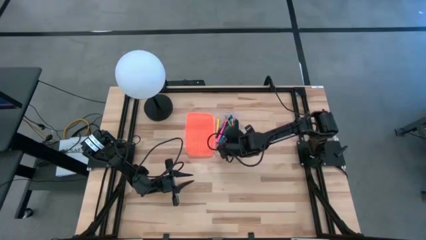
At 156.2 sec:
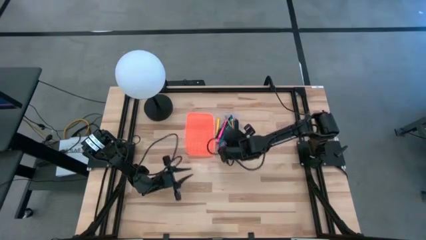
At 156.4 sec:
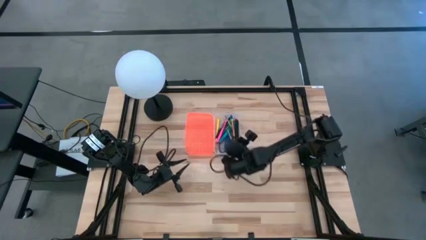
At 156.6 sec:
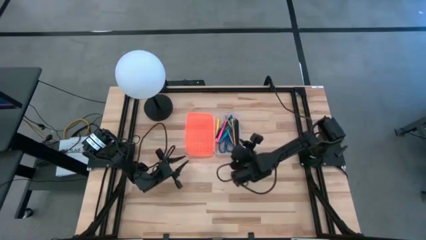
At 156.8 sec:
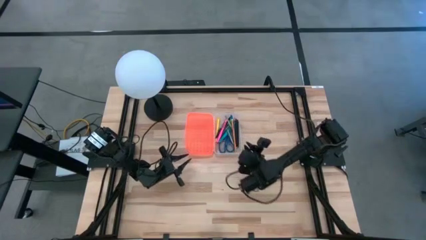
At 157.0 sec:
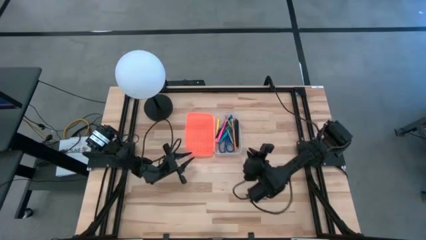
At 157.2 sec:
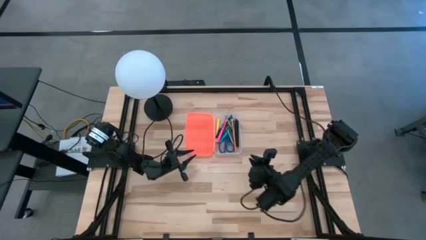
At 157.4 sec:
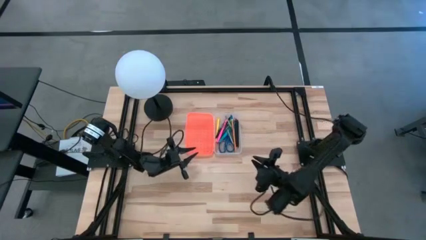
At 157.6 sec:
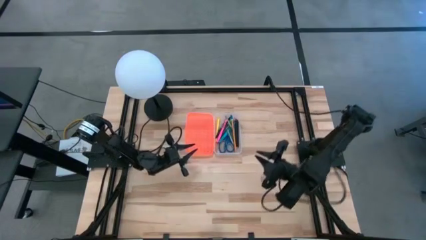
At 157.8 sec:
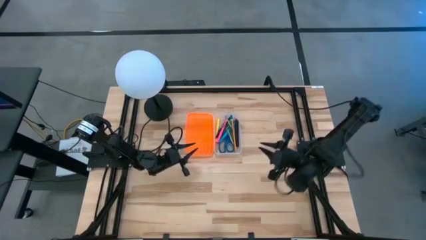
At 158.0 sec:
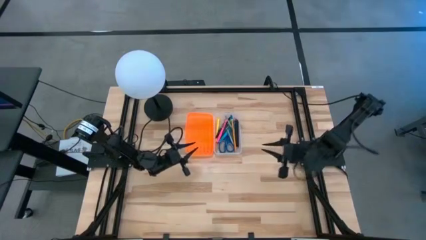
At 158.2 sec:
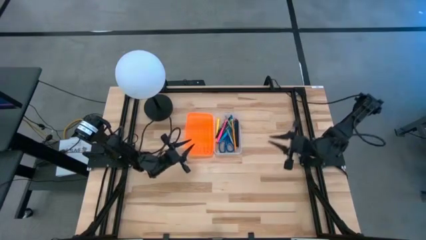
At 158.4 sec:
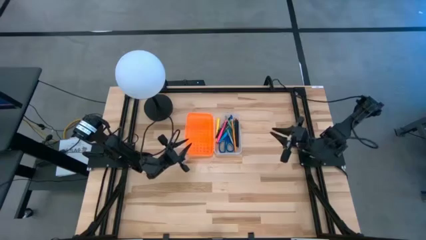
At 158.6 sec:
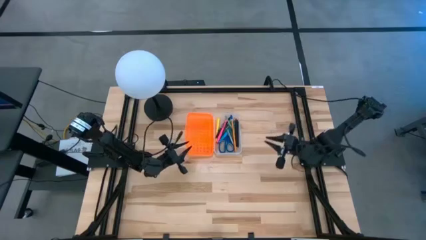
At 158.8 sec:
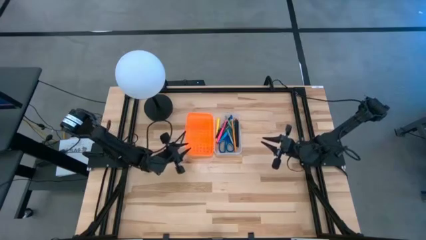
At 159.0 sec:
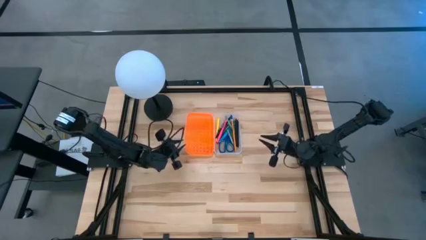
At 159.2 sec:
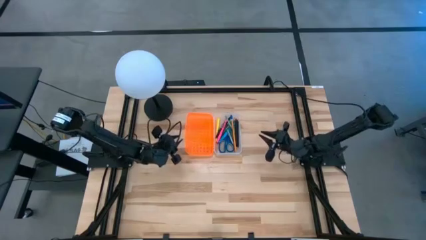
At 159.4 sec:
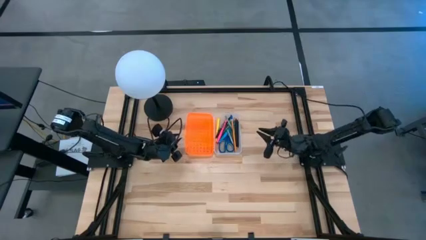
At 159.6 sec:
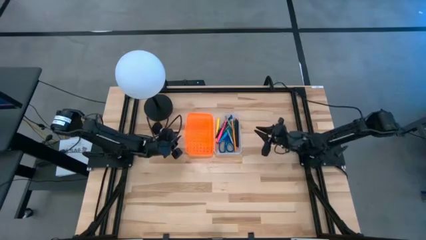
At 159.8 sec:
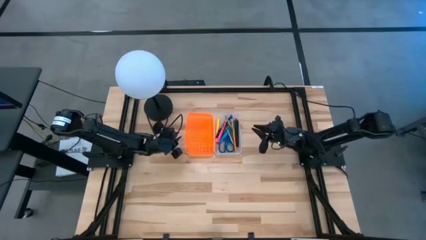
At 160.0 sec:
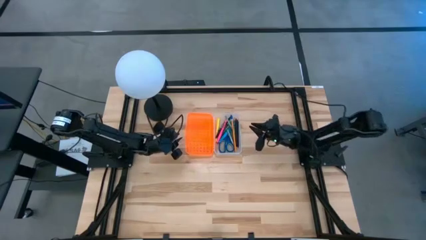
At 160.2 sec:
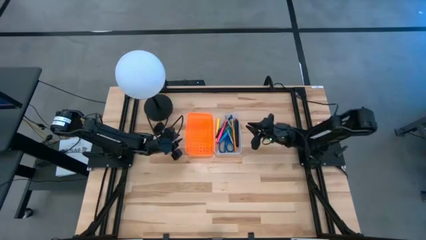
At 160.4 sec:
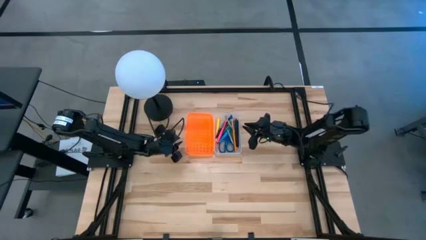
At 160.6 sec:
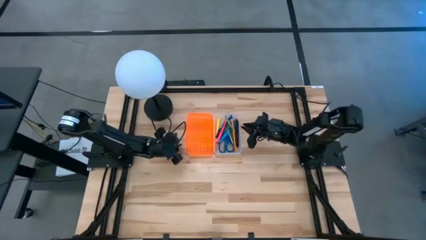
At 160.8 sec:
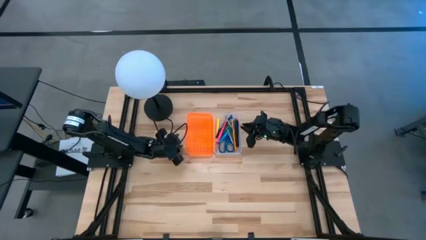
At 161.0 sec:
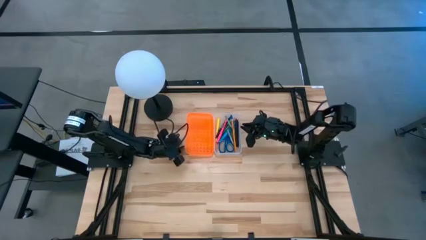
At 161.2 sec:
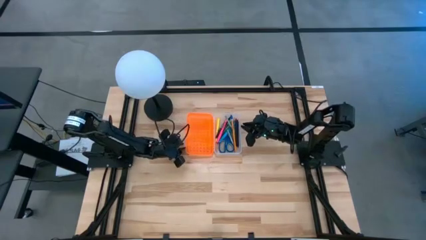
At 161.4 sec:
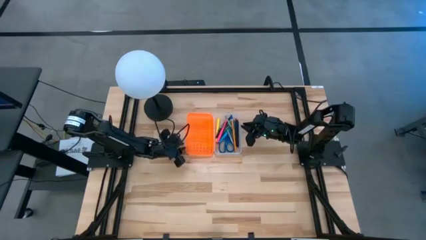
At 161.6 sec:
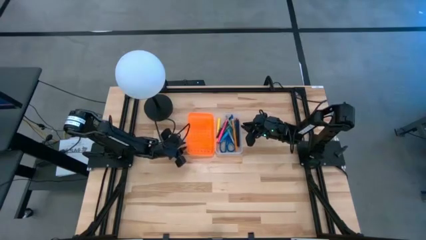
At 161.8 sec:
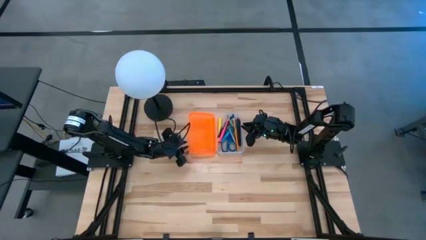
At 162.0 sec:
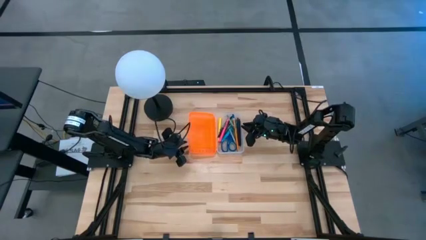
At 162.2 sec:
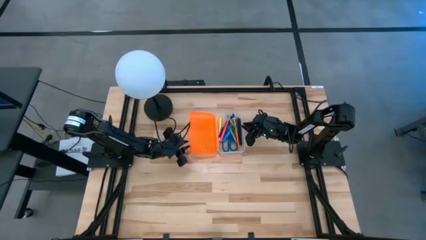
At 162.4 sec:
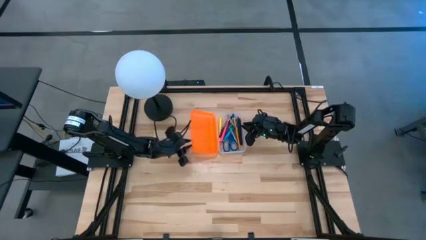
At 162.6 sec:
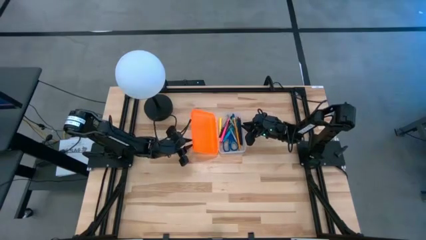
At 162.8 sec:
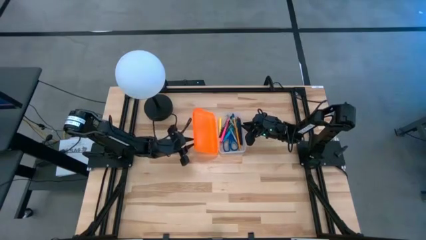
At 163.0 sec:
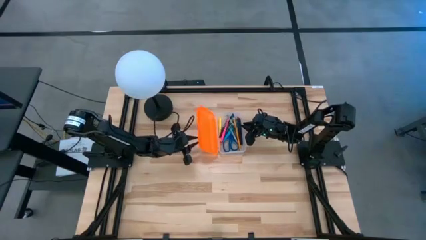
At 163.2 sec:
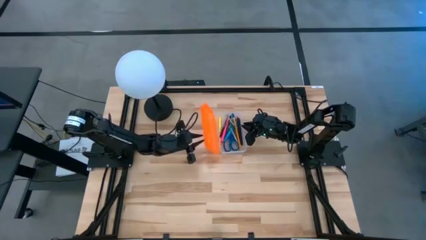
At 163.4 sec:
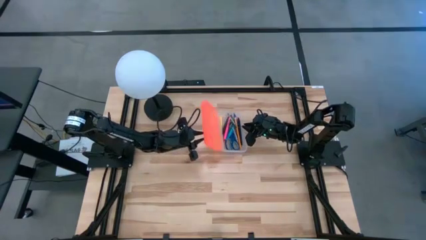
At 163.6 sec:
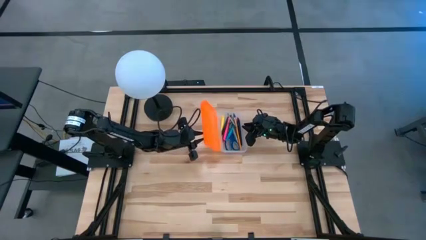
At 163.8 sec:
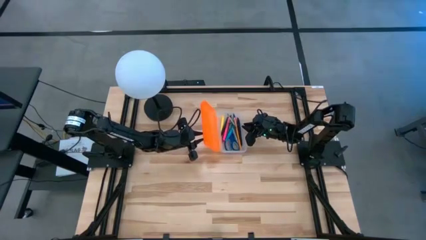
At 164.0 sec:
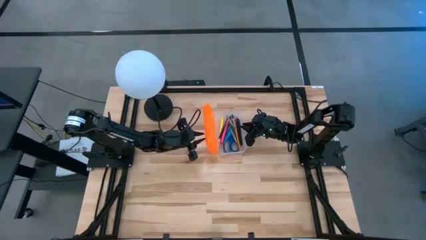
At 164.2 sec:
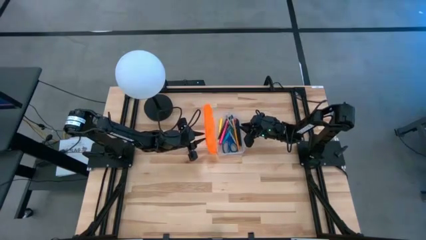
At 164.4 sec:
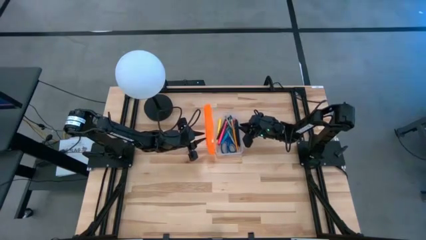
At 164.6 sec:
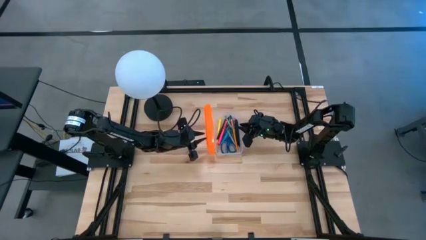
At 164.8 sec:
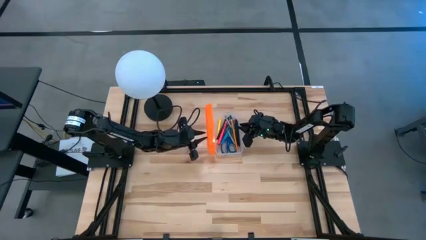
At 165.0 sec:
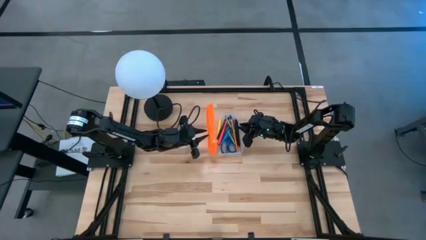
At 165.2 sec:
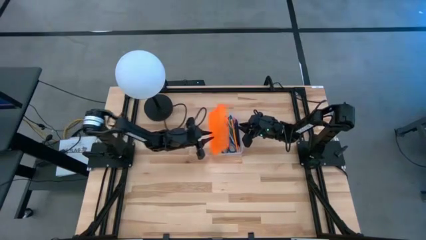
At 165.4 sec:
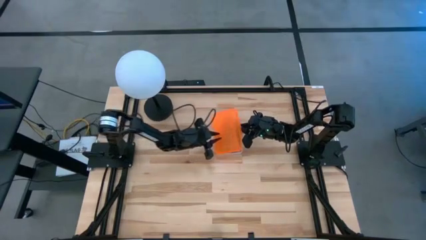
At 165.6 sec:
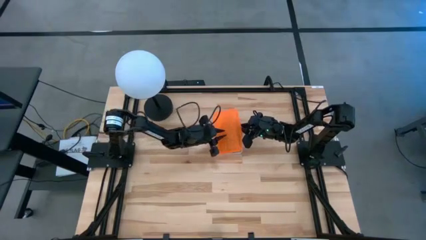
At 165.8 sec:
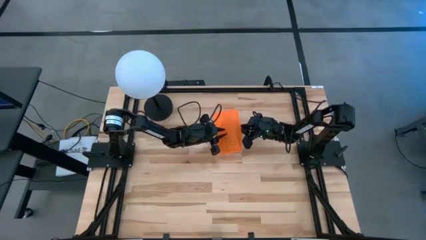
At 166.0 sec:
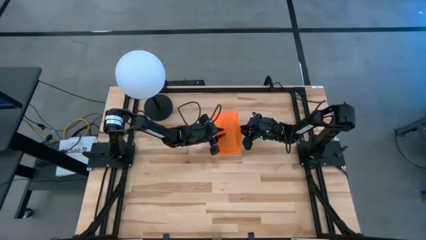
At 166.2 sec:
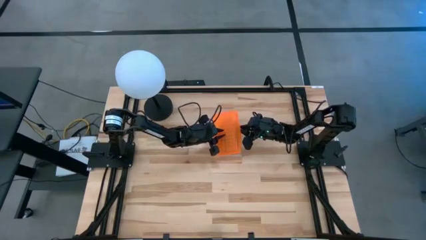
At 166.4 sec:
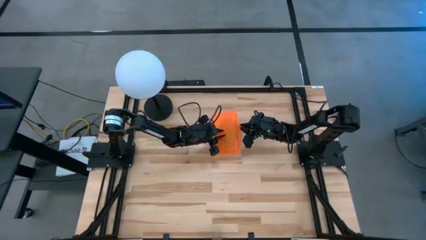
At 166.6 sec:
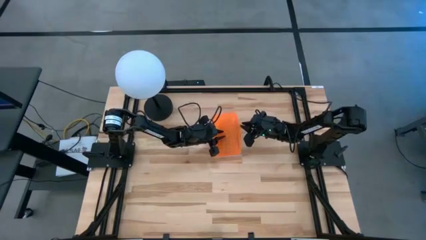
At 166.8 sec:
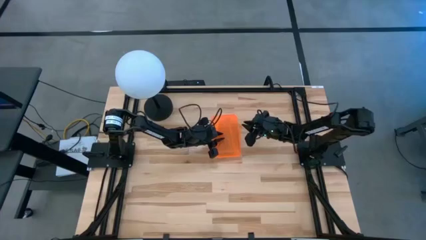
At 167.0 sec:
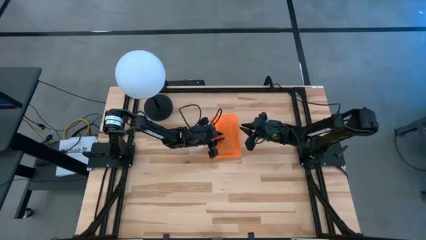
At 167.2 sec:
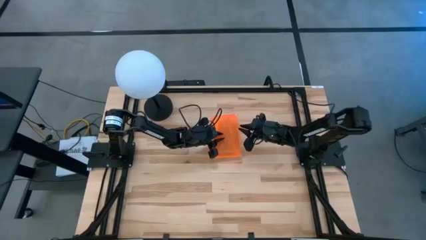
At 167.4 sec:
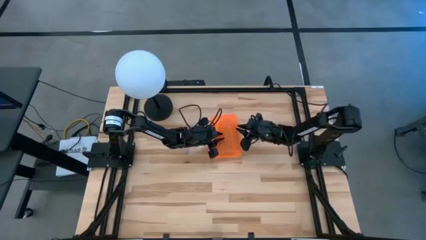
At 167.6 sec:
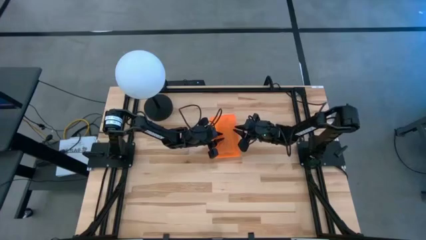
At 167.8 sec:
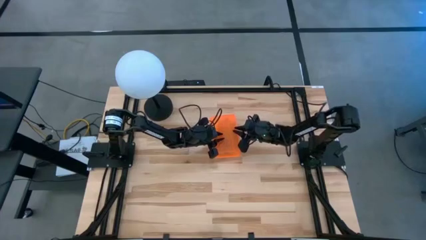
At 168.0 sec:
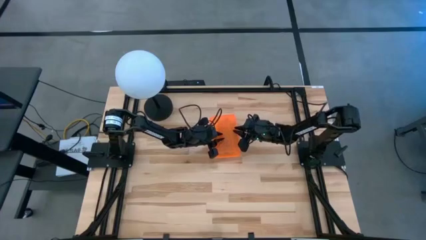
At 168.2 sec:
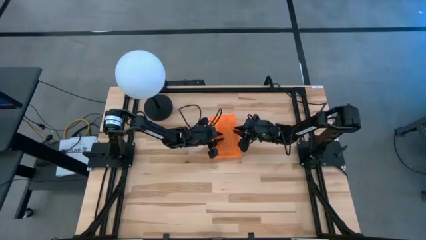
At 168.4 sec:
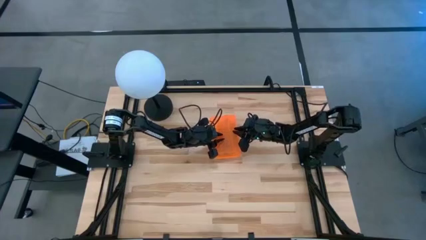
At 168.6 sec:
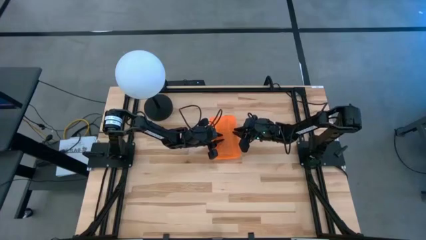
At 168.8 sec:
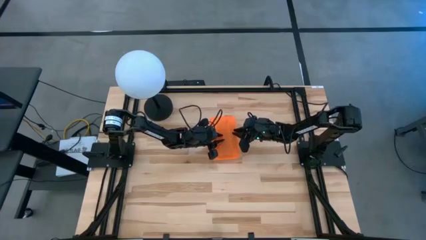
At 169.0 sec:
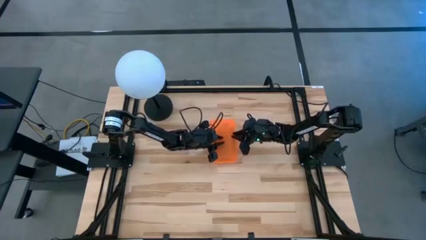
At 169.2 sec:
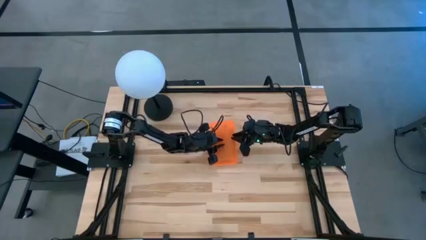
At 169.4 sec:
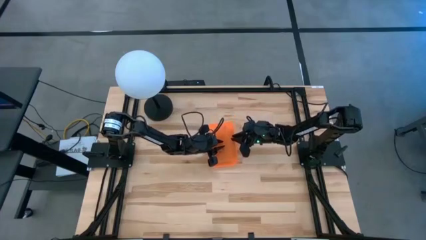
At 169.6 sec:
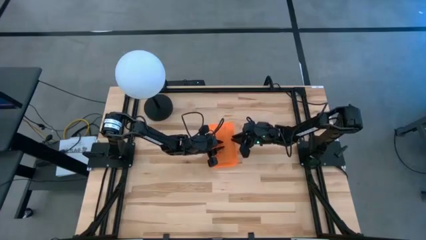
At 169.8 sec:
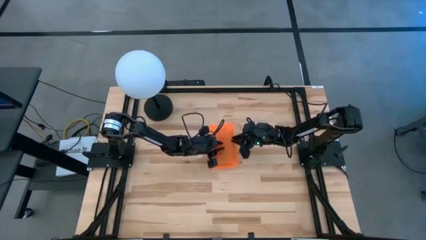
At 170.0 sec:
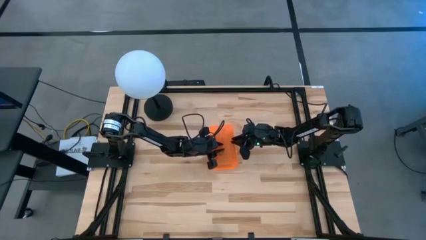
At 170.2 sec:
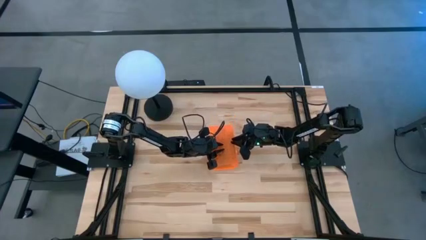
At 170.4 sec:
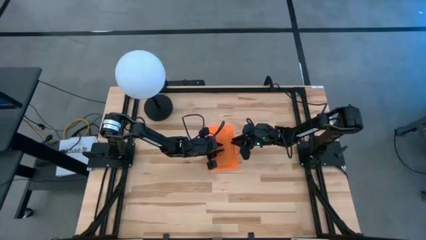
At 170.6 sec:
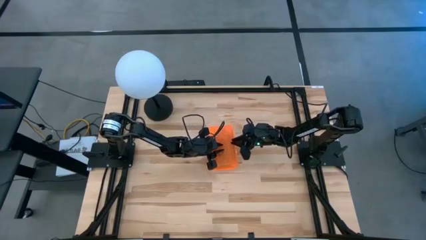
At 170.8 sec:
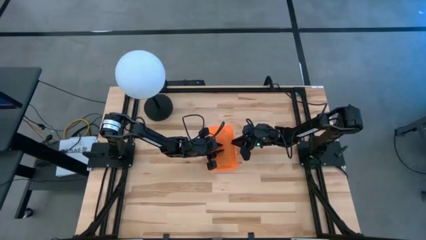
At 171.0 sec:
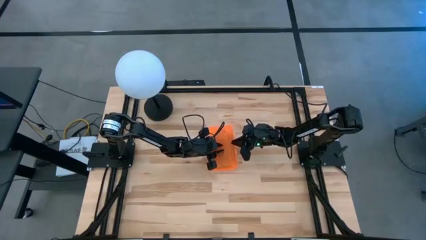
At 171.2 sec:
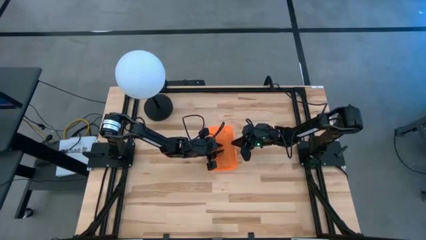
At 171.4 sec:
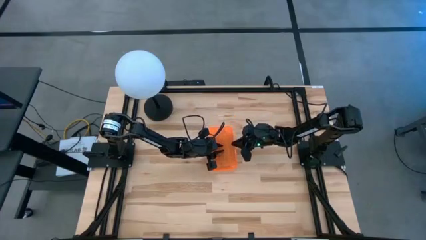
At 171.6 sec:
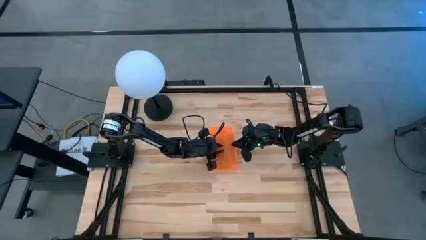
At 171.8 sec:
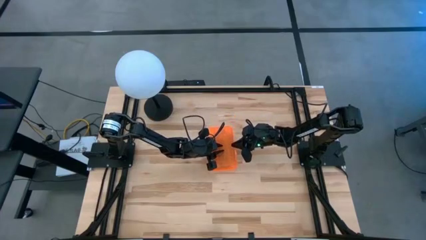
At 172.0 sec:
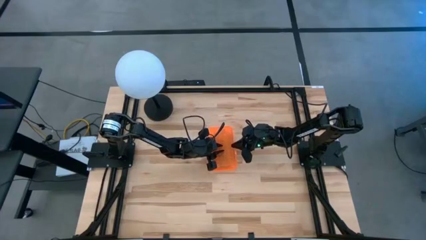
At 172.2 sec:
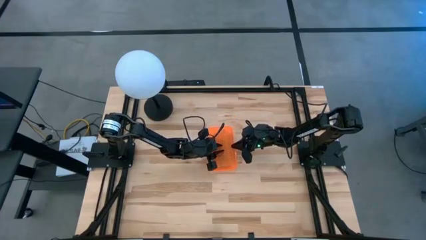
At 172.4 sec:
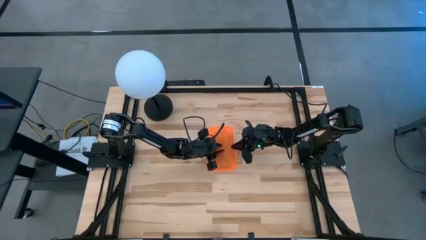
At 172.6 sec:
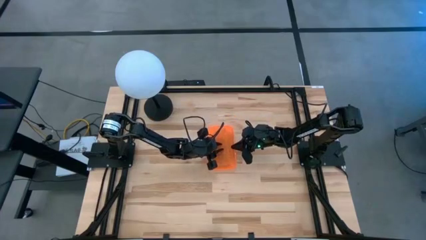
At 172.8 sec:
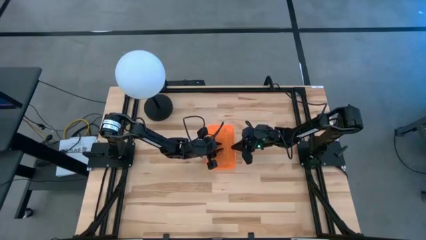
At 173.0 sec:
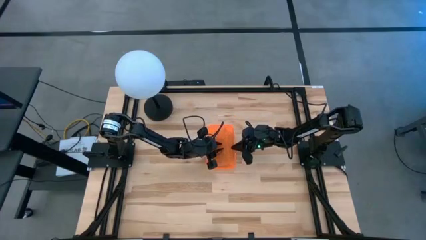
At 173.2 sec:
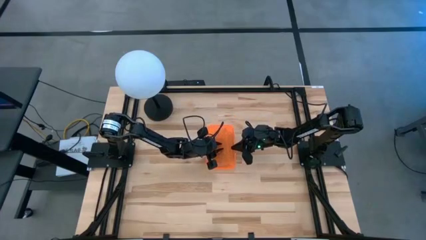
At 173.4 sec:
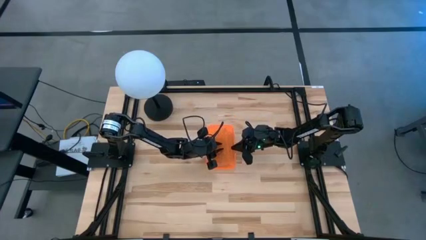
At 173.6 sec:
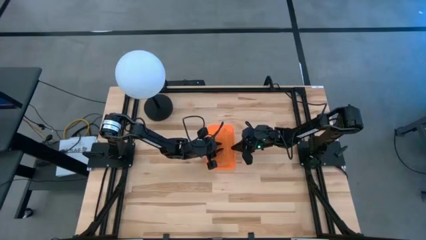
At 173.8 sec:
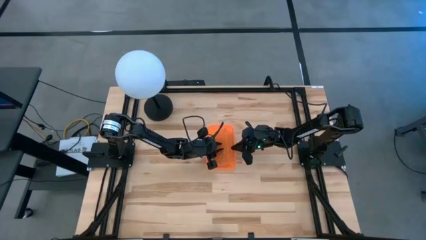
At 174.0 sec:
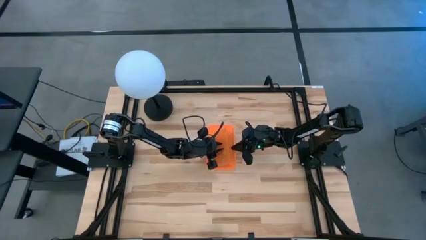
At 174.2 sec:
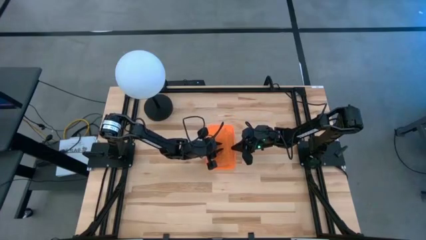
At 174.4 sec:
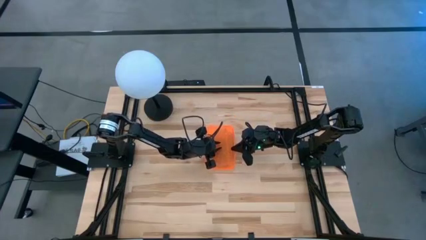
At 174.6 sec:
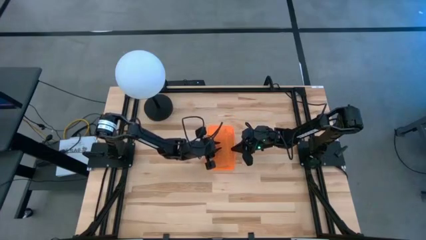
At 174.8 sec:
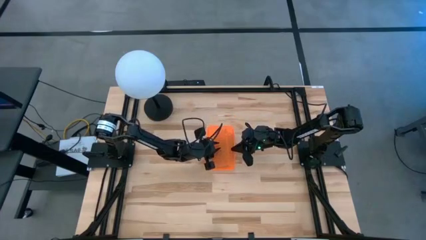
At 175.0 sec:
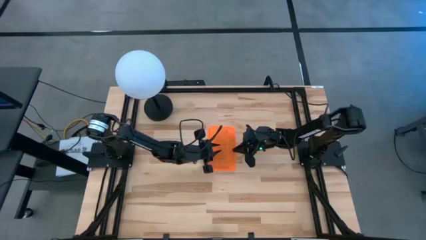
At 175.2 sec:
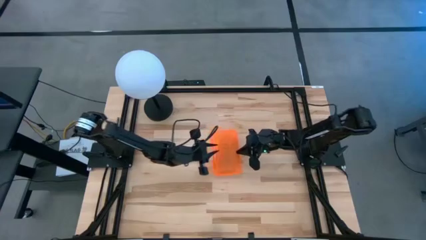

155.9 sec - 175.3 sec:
Task: Pick & place school supplies into a supply box
Close the orange supply box
